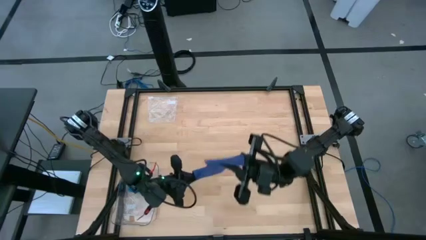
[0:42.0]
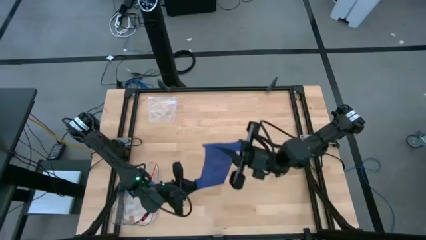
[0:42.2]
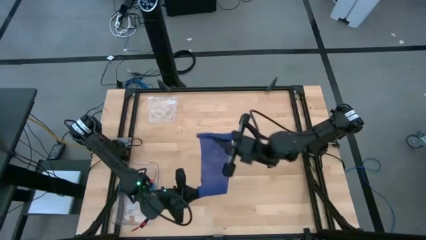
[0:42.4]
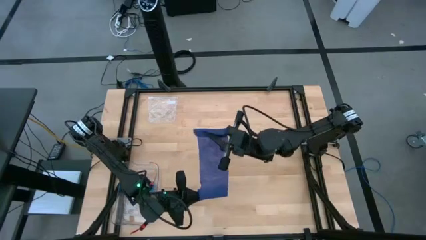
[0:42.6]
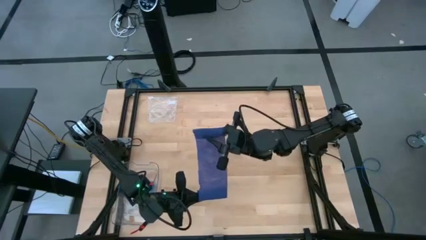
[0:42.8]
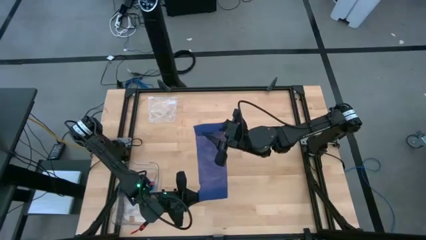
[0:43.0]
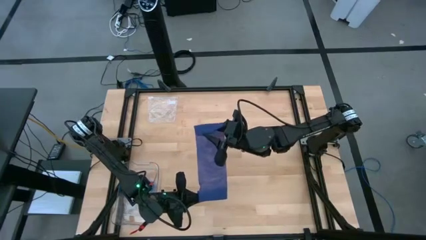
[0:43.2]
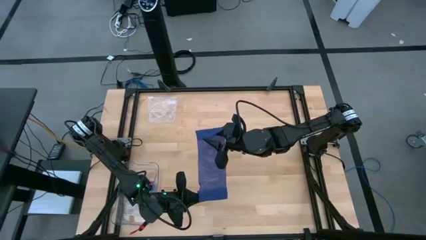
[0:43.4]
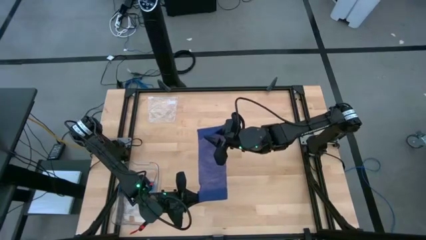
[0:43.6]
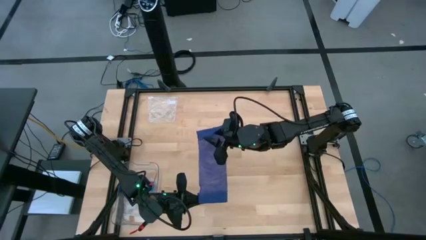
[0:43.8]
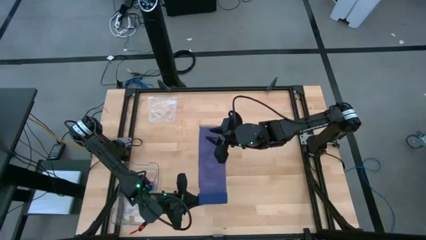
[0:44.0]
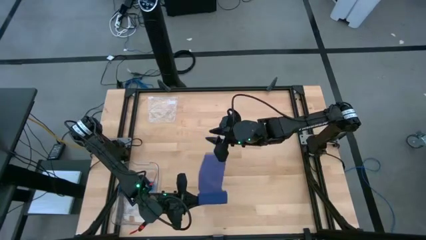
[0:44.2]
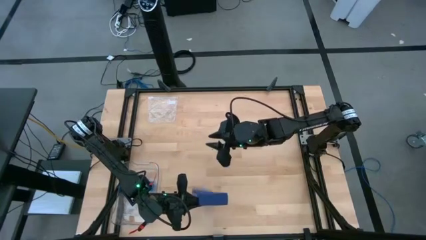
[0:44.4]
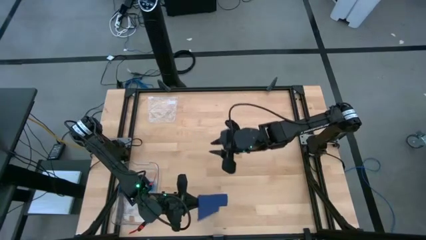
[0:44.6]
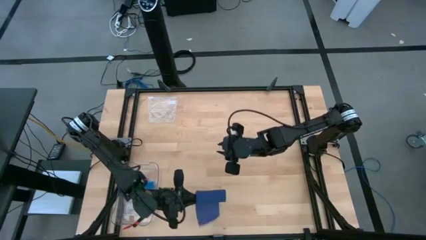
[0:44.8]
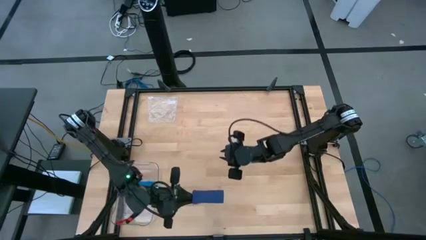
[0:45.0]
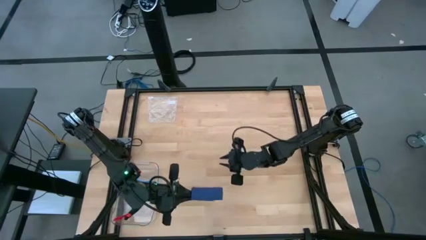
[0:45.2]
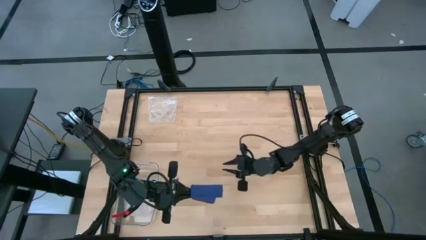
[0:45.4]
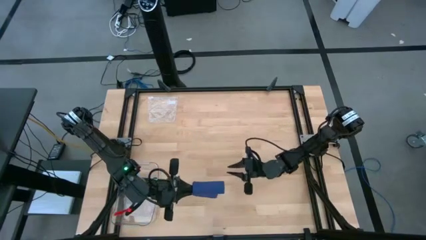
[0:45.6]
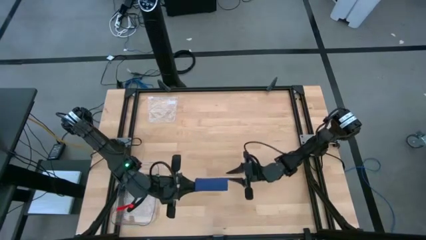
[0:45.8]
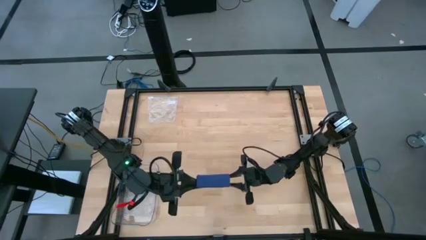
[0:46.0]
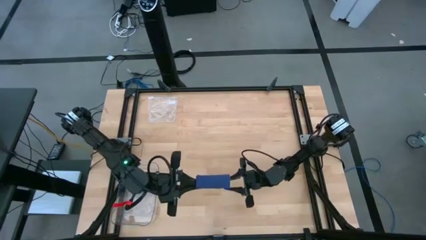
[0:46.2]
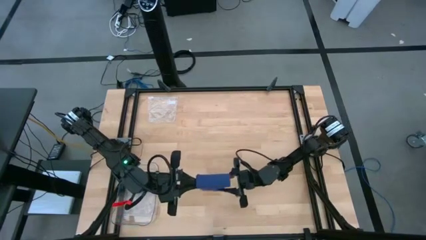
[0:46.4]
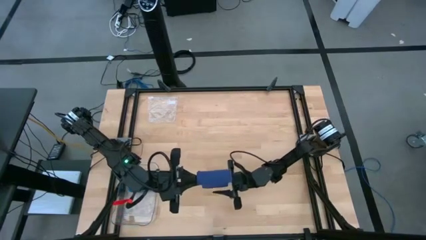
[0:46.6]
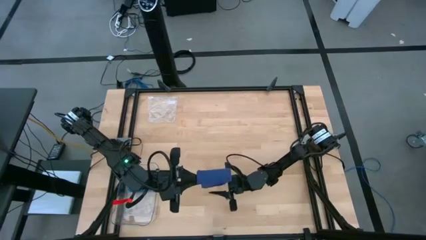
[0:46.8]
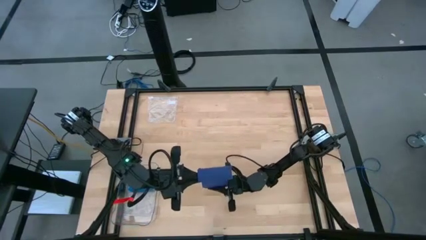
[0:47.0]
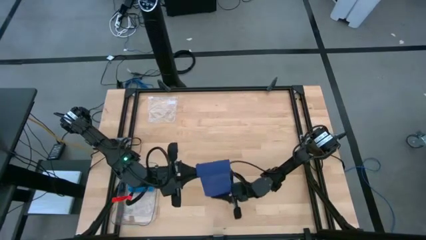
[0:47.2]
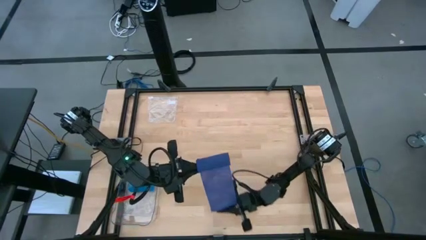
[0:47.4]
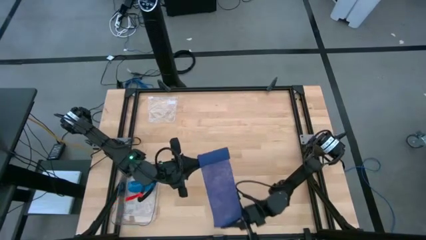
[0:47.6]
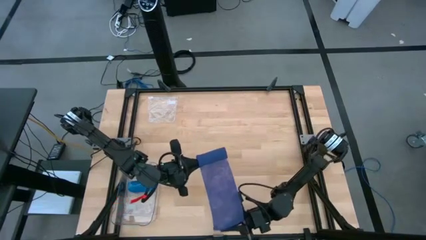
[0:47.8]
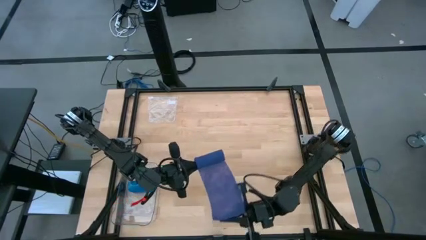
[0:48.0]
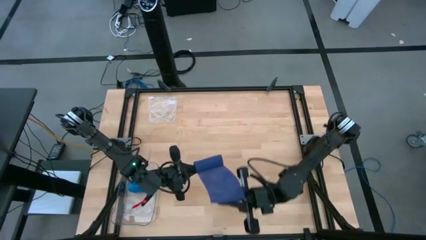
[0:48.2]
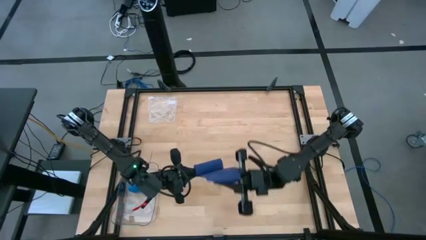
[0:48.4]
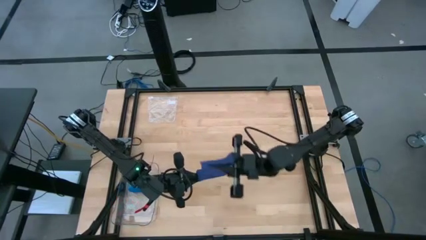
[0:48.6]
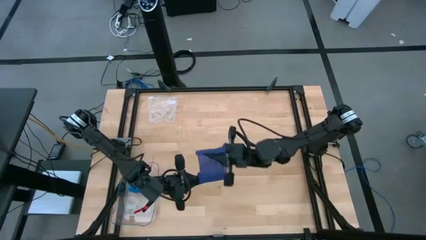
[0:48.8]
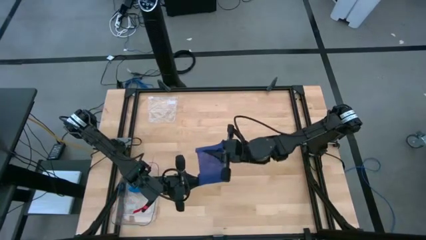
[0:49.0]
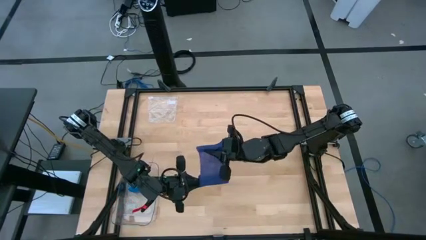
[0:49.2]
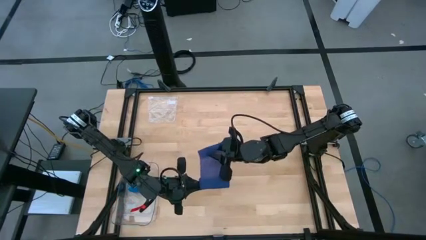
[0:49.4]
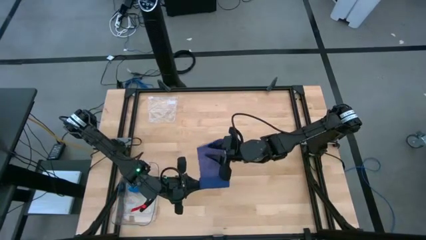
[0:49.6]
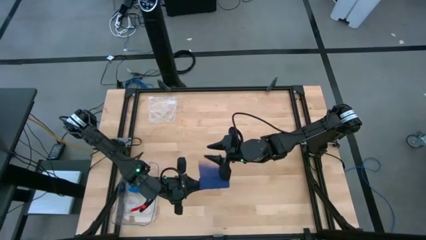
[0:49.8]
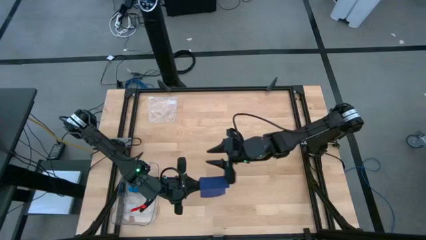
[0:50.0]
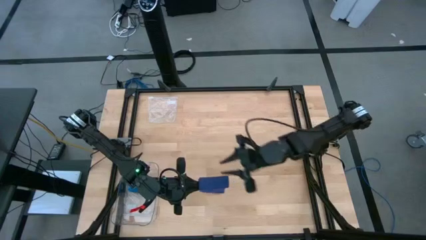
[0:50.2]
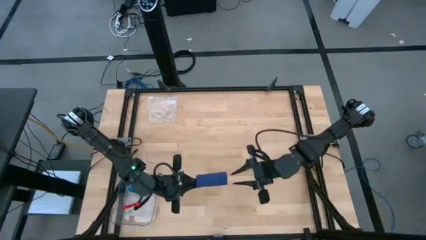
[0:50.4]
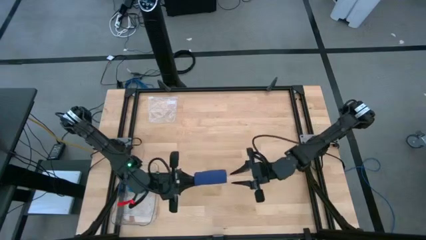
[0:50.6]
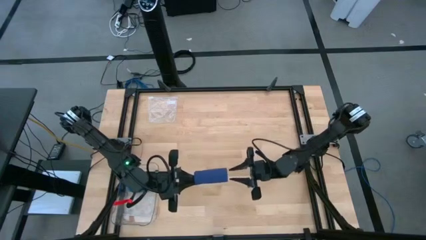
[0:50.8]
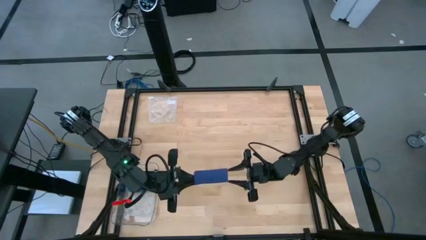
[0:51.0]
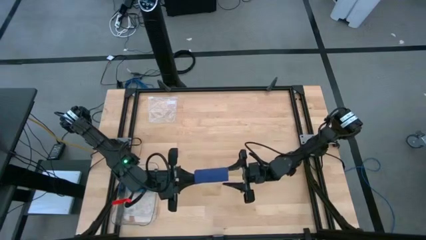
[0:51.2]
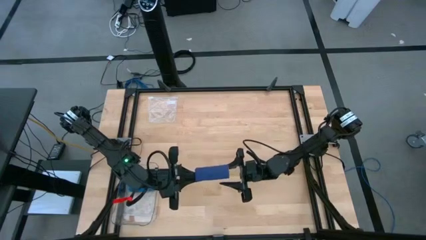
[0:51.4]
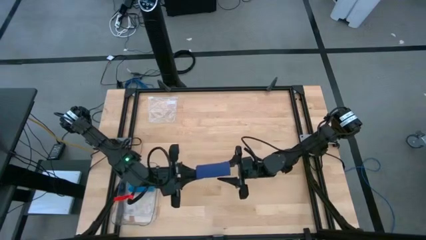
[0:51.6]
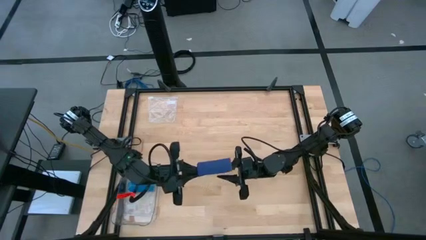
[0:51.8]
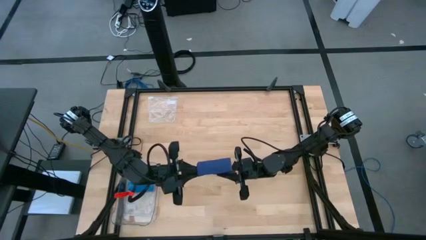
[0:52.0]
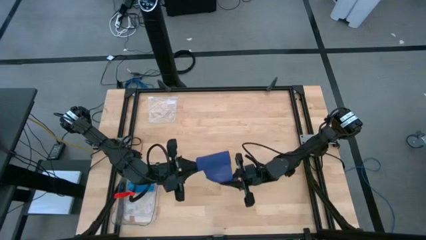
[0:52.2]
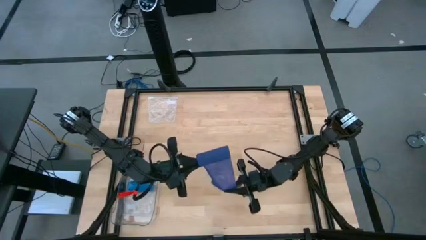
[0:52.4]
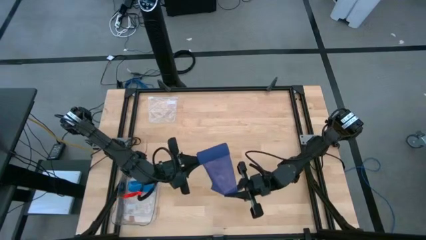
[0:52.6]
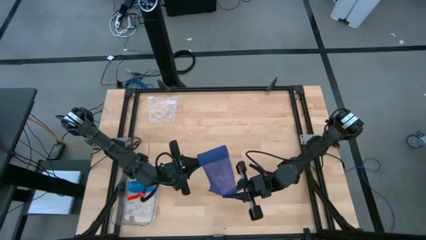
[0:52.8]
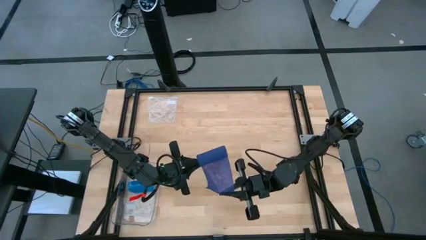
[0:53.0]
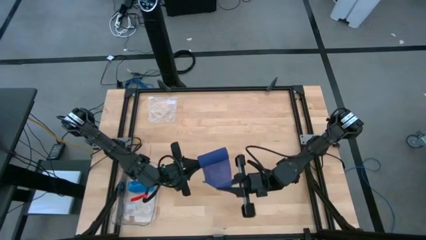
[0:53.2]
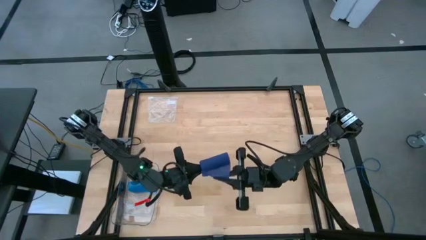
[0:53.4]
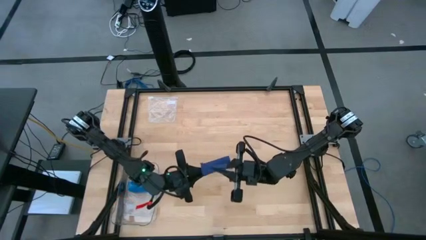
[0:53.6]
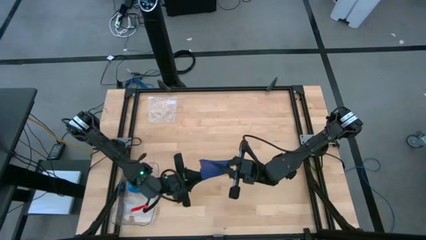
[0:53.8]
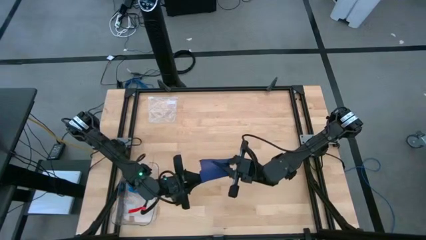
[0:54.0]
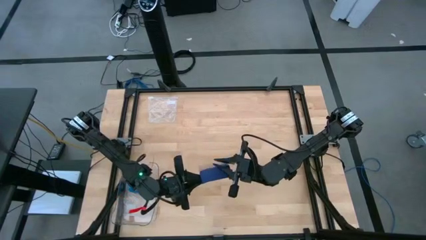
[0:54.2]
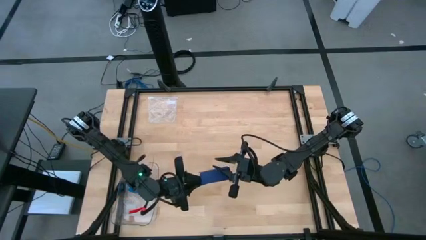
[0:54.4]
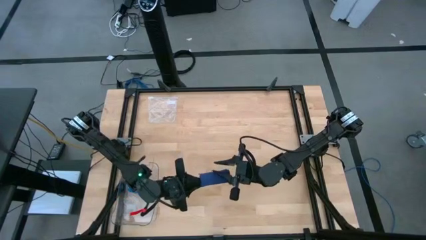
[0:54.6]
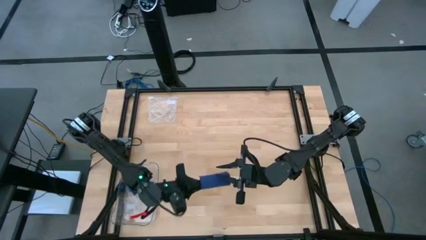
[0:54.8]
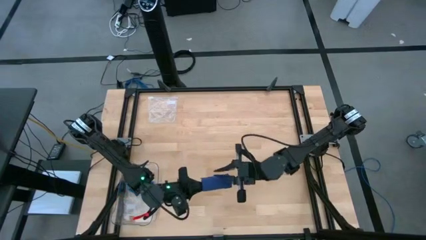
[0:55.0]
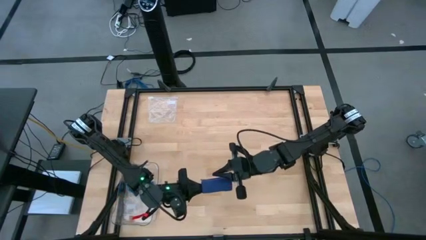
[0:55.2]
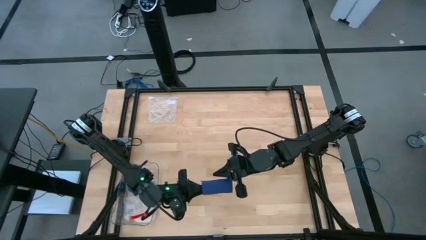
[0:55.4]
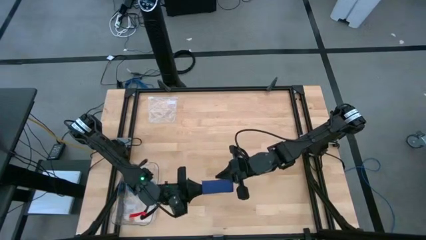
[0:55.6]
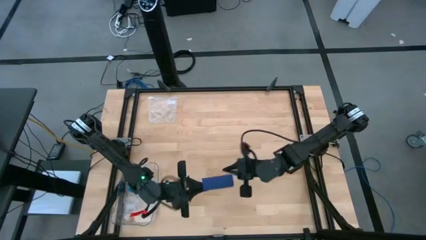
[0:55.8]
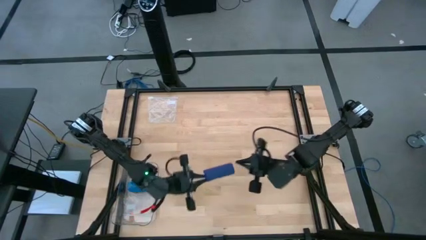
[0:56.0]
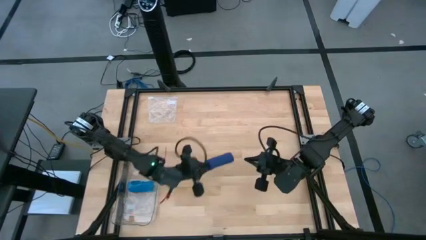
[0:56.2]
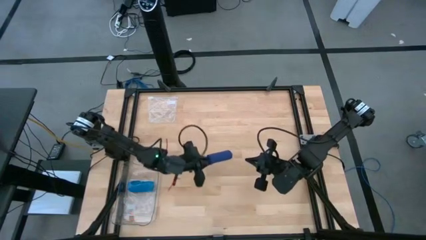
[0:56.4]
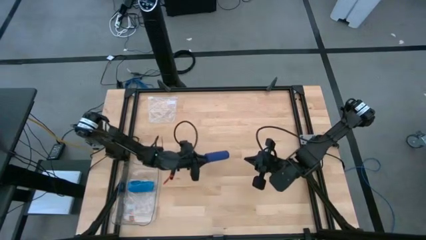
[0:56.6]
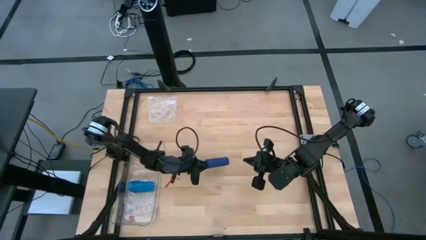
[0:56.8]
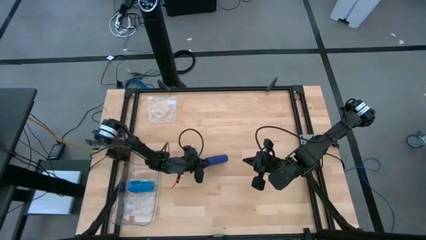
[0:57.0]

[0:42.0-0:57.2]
Task: Roll bandage
Roll the blue bandage
